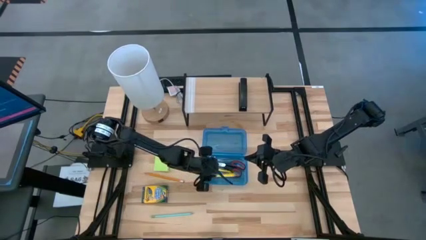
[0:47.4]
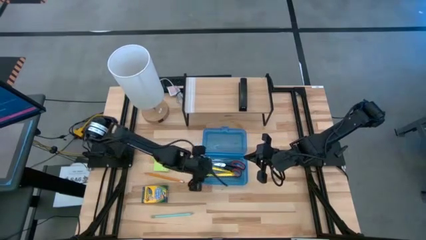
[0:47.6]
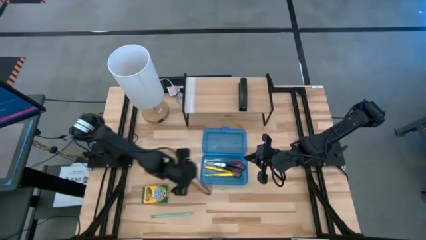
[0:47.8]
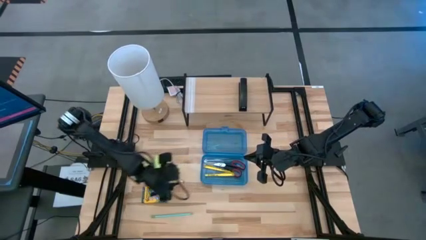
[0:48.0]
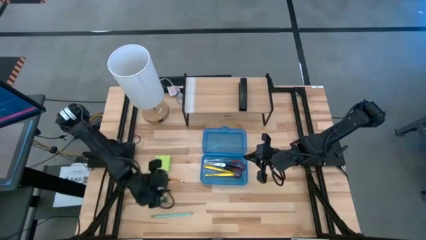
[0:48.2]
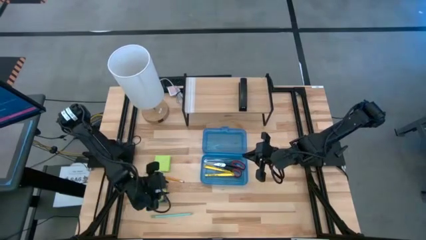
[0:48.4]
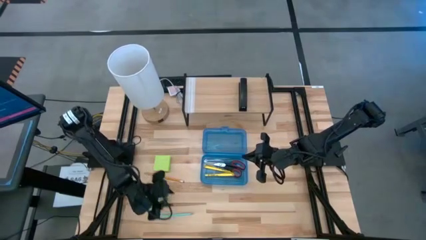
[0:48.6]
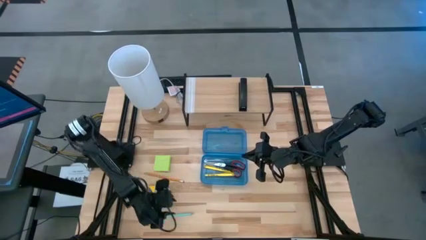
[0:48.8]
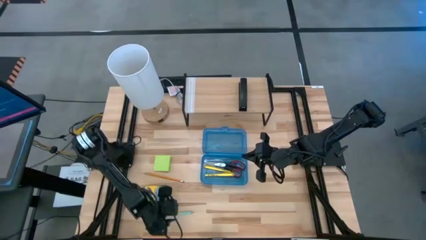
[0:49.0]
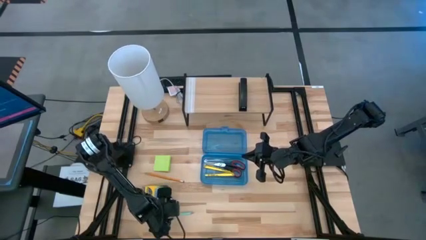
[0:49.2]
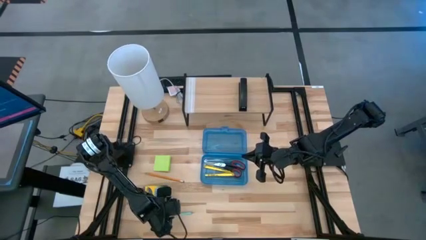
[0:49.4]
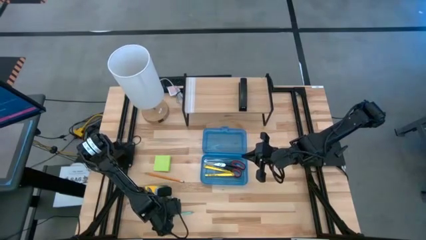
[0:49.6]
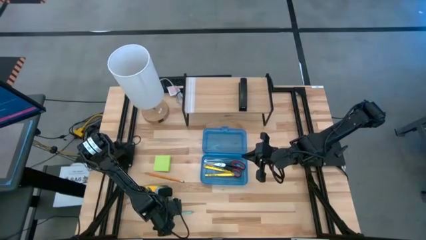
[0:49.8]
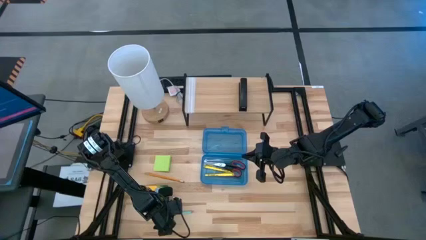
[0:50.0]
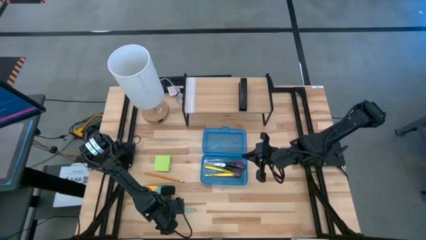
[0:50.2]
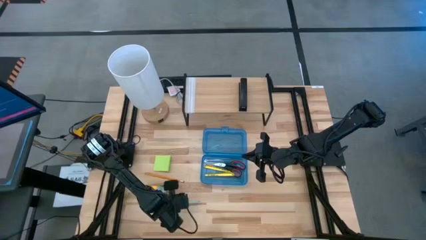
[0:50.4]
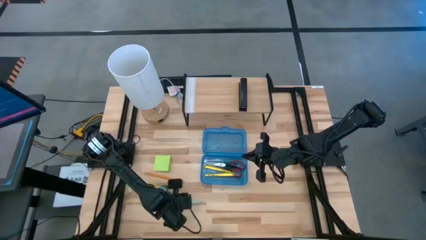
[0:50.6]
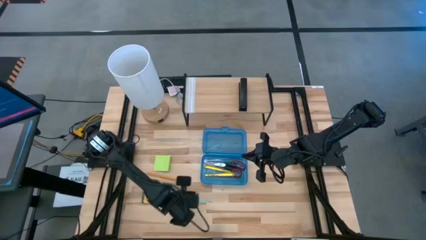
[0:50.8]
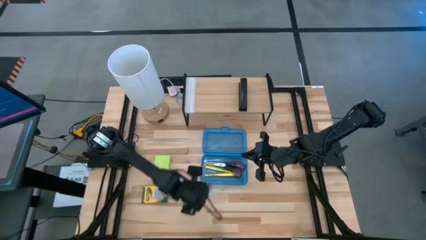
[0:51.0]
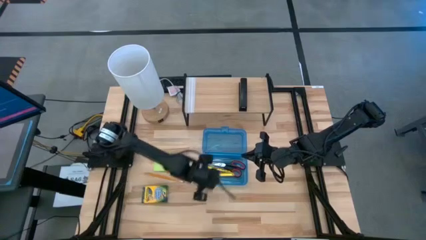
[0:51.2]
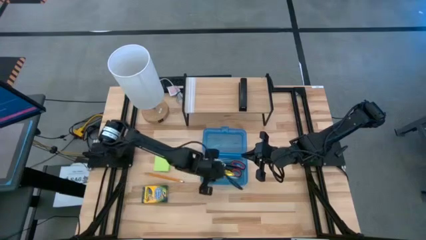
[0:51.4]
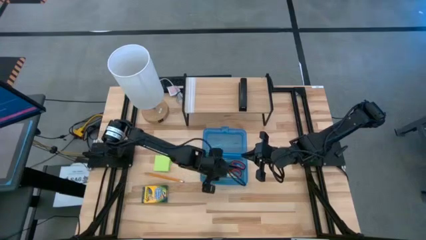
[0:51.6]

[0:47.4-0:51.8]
Task: Pack school essentials
Put the blue pencil into the blue supply box

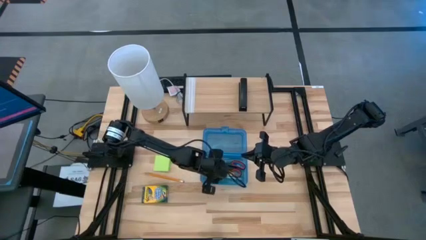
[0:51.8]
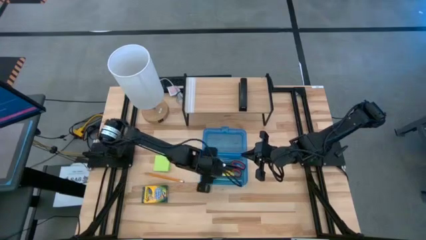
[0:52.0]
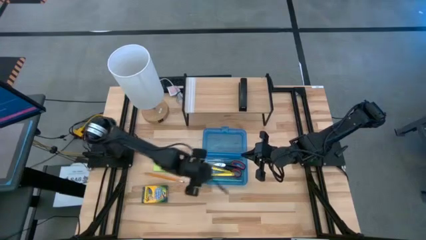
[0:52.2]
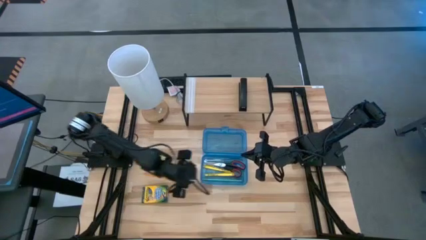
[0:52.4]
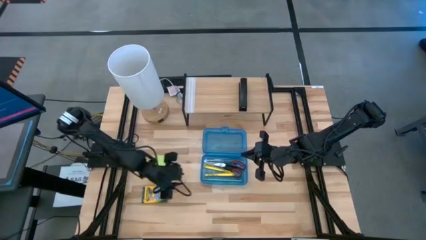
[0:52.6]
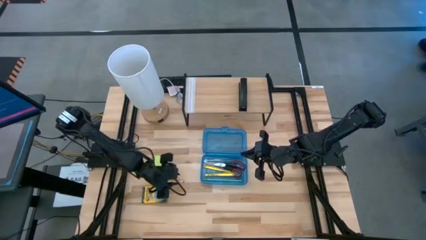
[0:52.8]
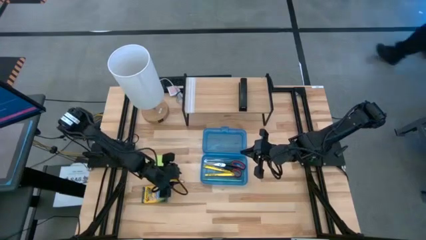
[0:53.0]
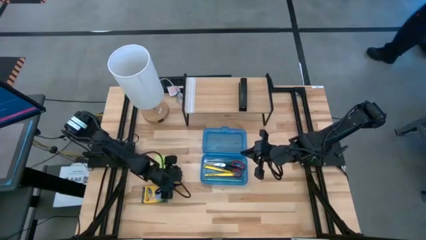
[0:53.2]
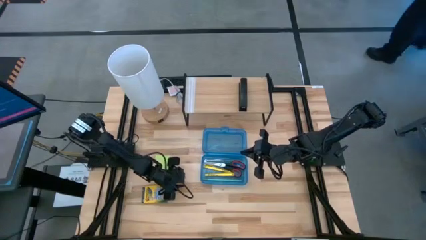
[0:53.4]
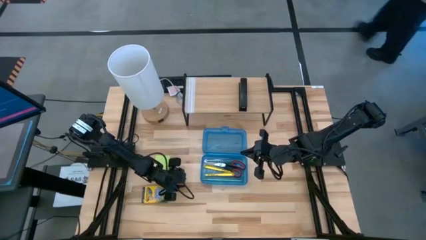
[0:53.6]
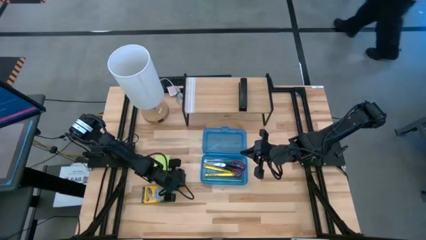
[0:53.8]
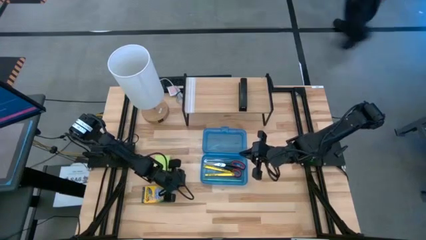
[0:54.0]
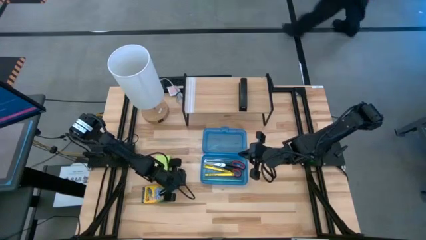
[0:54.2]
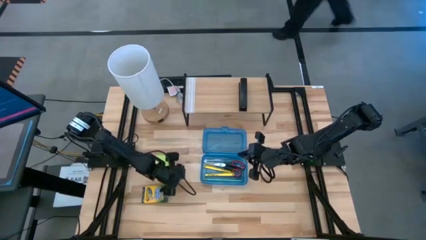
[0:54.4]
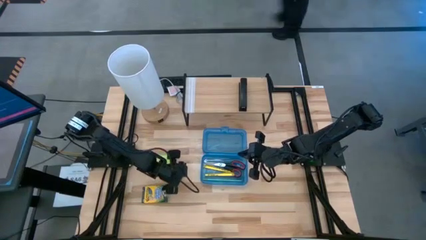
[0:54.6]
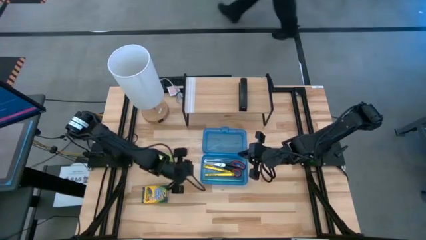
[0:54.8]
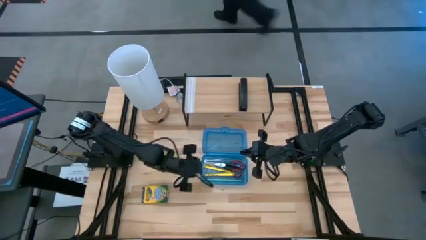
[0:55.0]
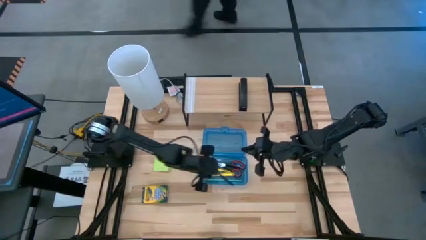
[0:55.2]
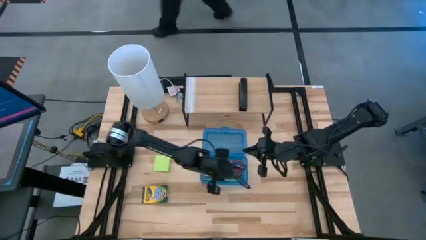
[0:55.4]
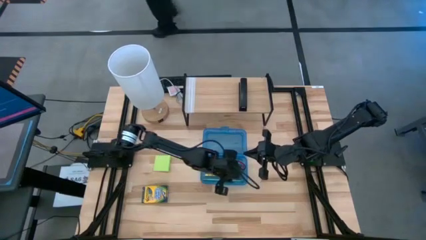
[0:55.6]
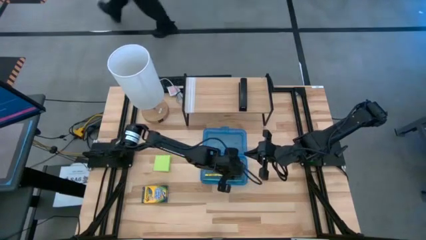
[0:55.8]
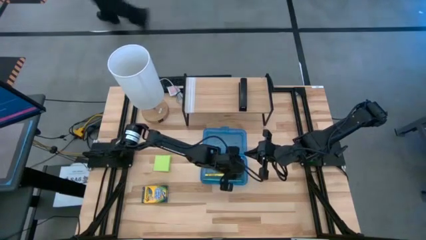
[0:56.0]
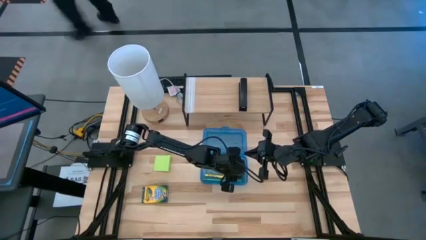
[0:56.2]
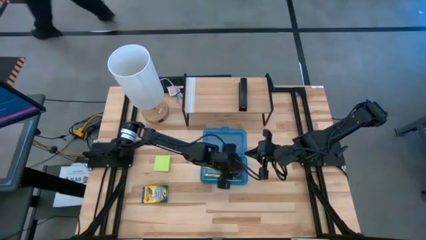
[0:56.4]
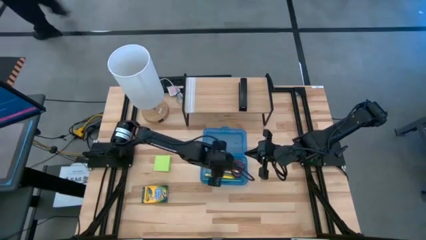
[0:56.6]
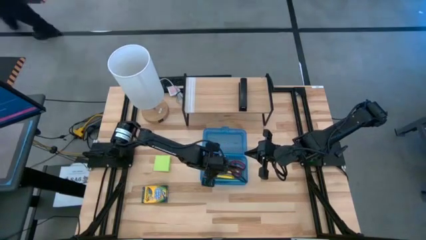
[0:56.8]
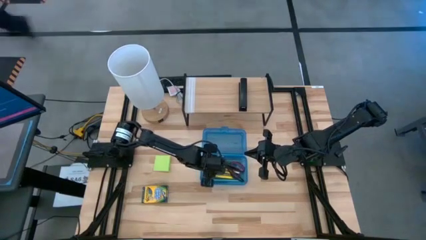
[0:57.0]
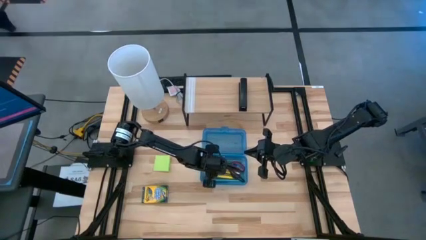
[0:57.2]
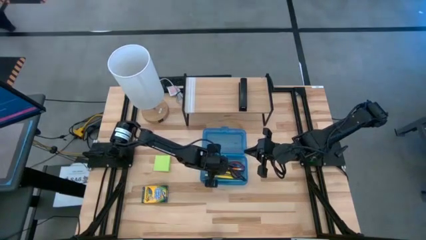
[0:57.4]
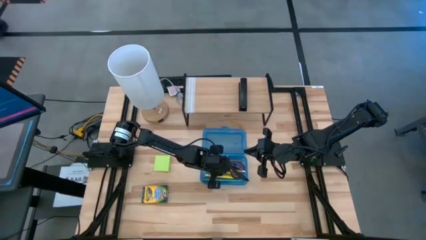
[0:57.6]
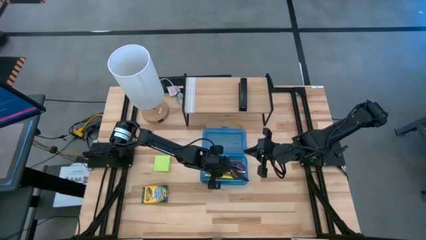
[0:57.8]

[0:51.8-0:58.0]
Put the orange pencil into the blue supply box

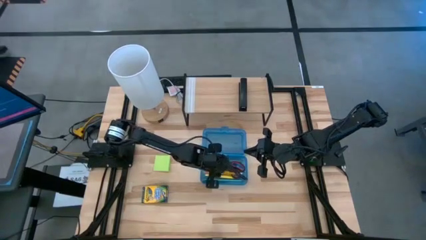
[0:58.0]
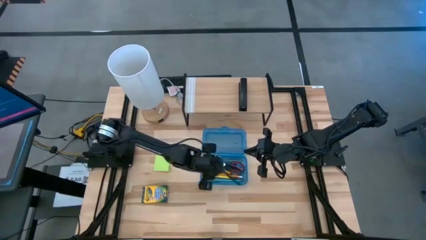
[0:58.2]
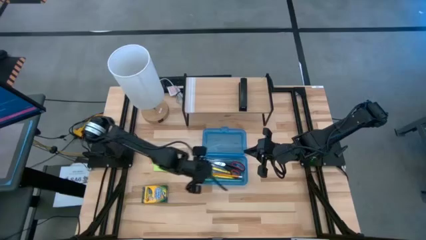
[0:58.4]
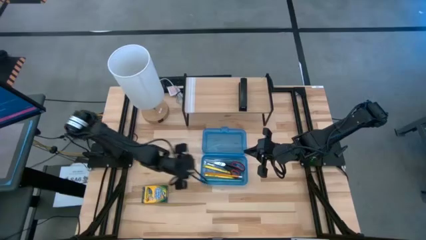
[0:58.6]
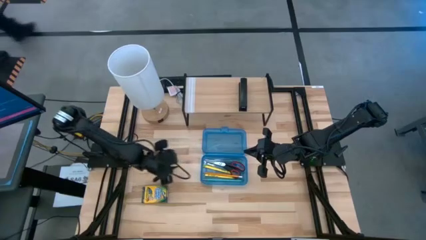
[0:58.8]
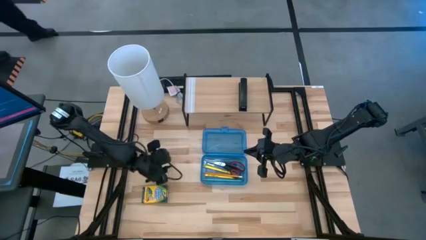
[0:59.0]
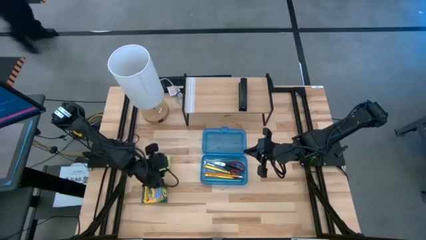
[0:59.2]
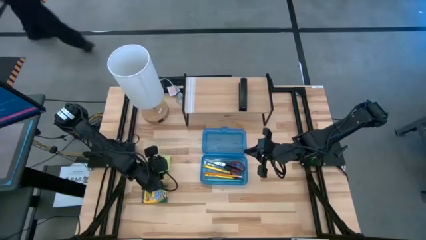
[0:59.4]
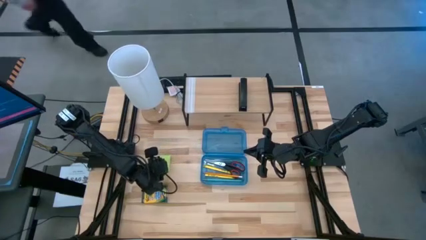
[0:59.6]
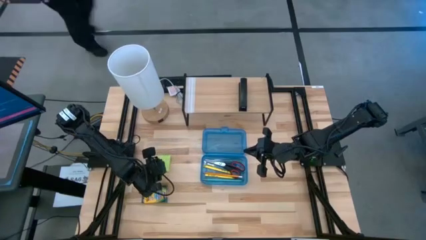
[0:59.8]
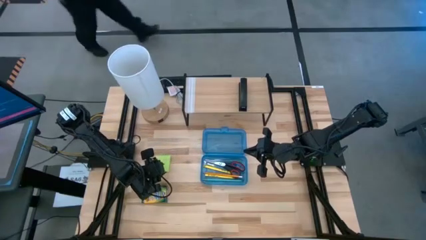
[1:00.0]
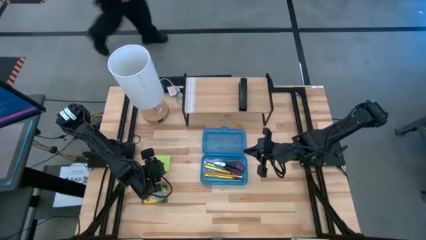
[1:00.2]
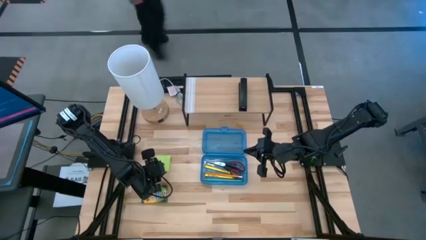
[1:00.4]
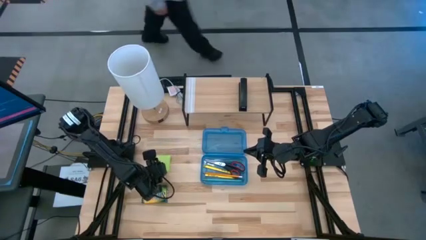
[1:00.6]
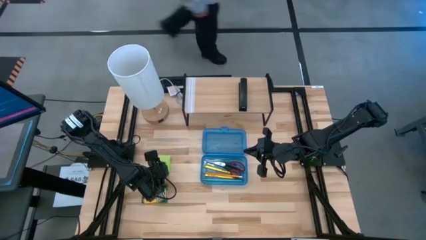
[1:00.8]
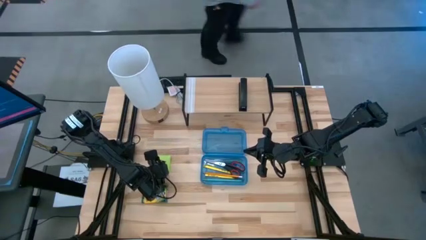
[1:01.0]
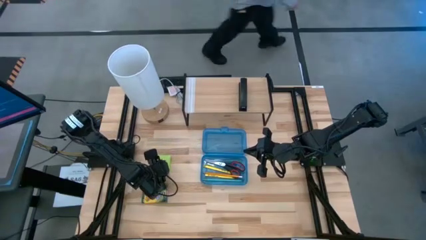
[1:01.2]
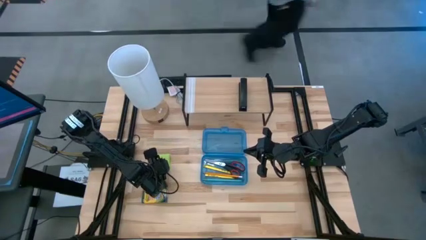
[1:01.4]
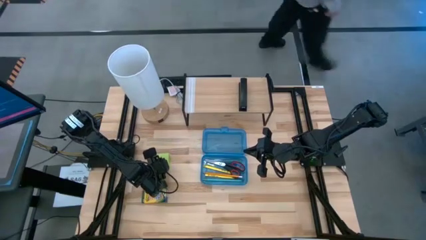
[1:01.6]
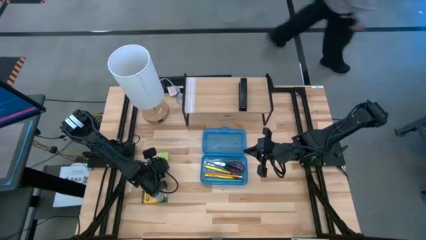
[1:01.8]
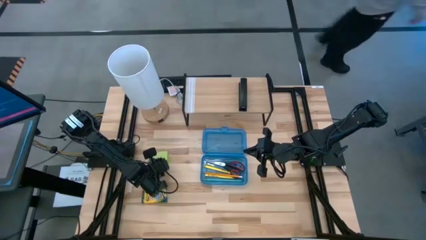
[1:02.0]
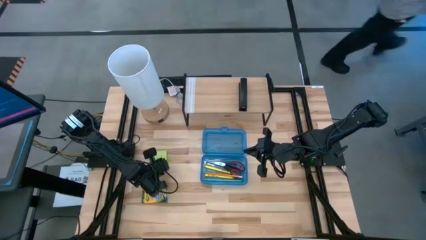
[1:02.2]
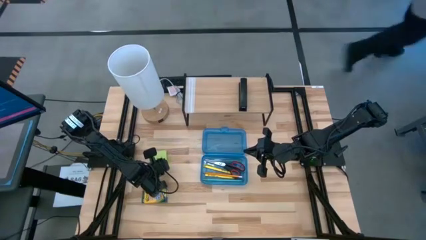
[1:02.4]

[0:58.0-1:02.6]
Put the green sticky notes into the blue supply box

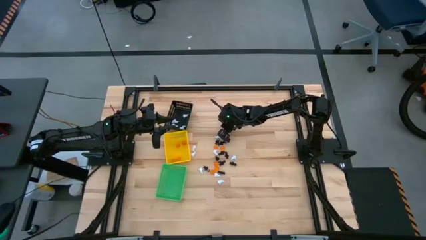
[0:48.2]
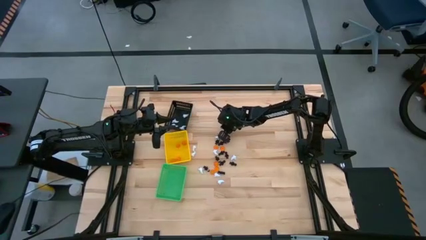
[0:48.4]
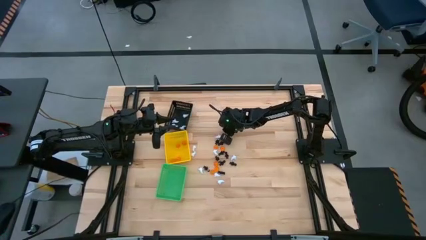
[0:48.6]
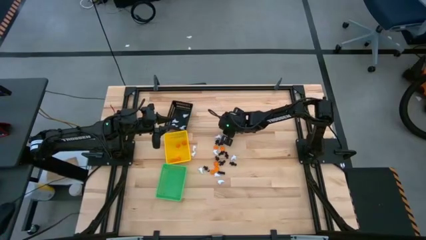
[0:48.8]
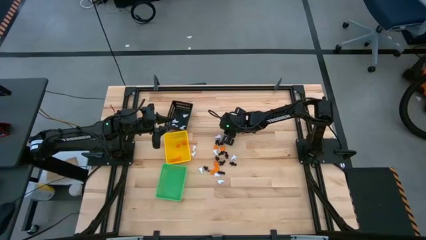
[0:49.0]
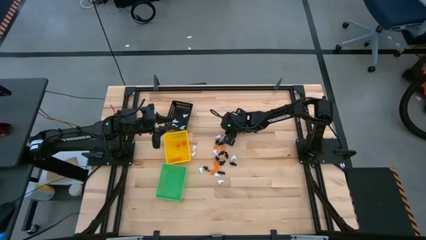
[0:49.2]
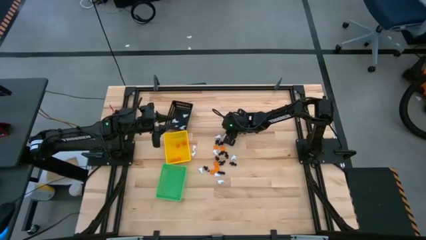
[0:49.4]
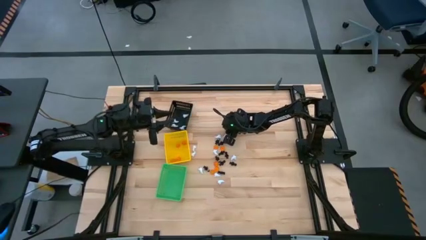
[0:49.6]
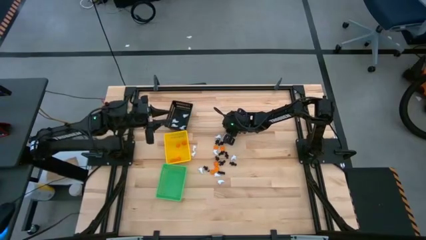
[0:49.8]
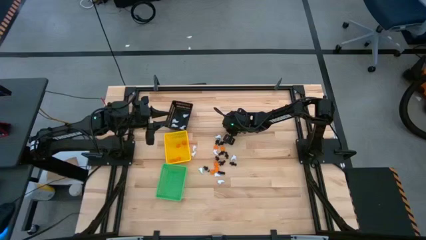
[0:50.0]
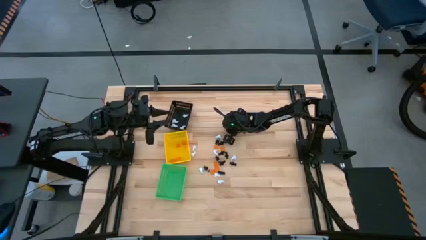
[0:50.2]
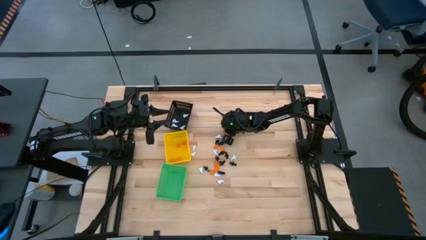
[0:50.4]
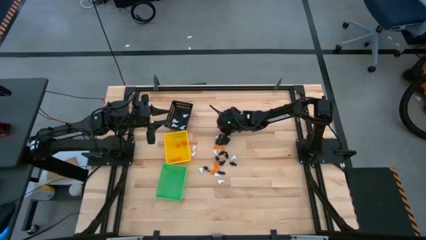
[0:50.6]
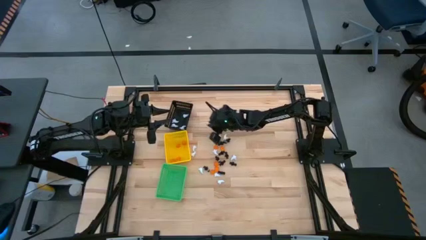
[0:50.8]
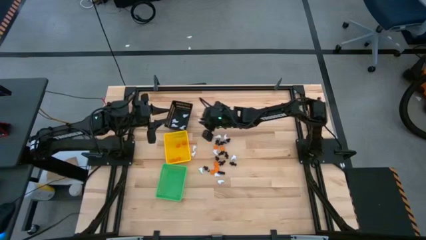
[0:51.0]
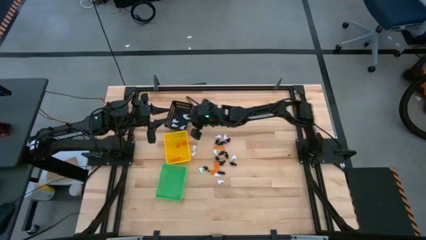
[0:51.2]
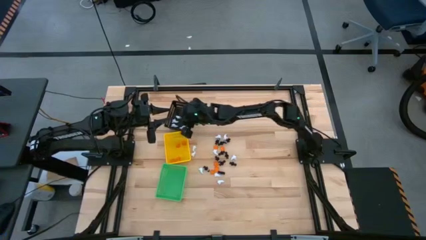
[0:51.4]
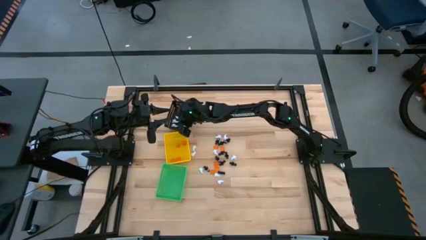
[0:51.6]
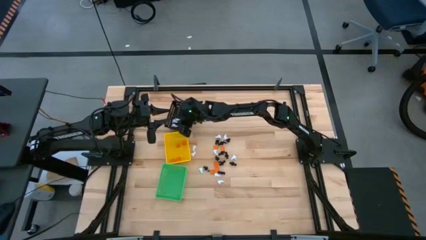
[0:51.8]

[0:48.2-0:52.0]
Task: Sort Halloween decoration
Put the white ghost plush toy into the black basket
